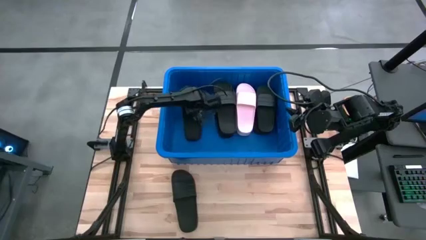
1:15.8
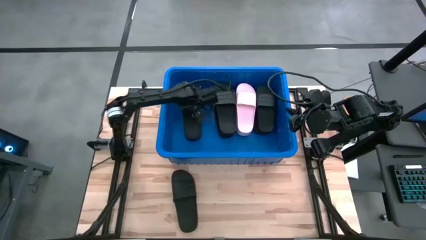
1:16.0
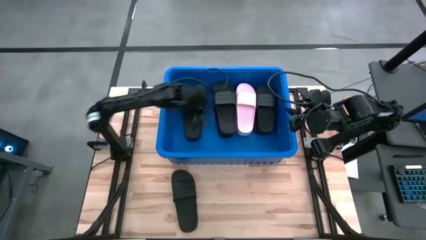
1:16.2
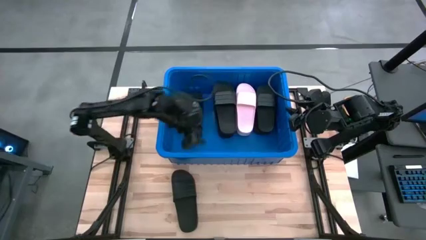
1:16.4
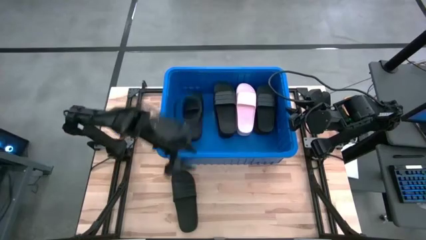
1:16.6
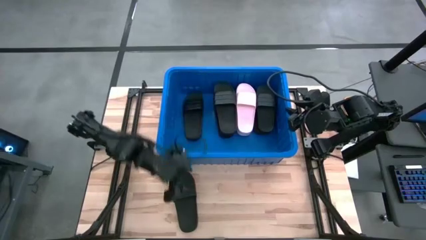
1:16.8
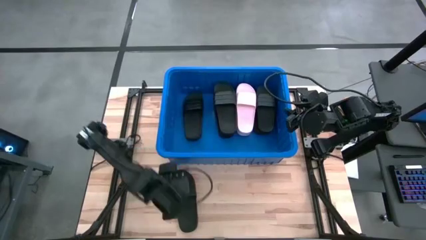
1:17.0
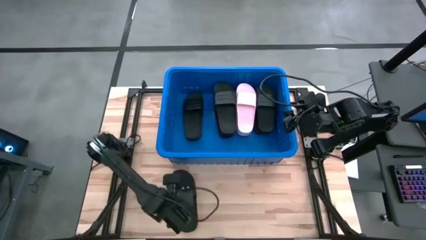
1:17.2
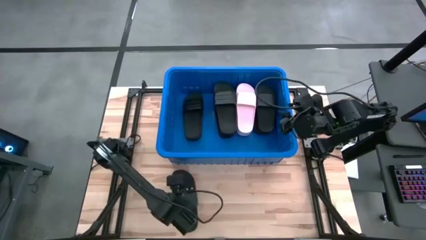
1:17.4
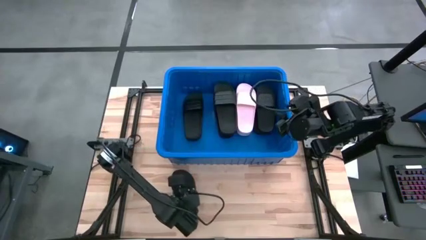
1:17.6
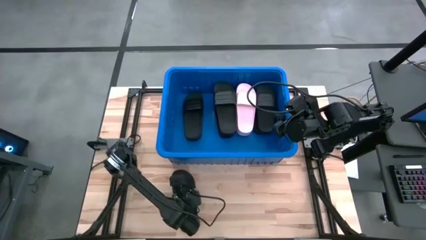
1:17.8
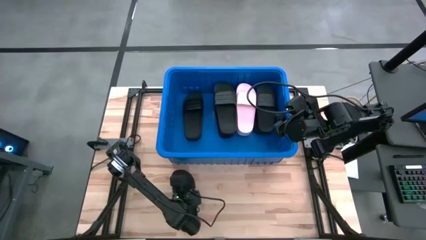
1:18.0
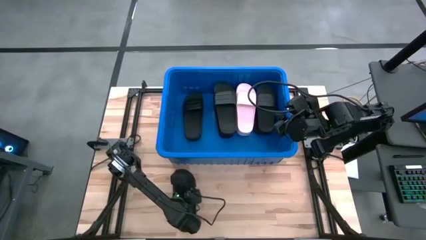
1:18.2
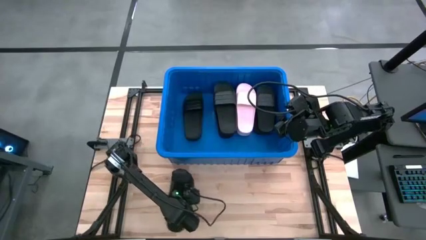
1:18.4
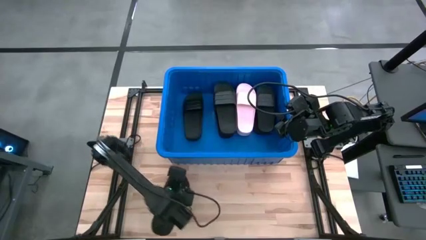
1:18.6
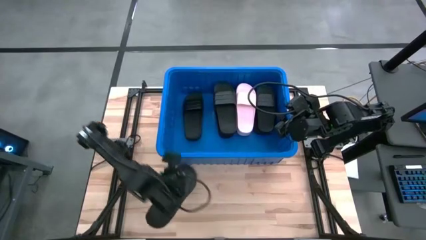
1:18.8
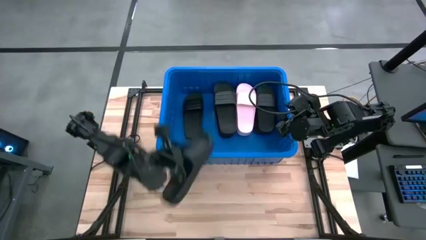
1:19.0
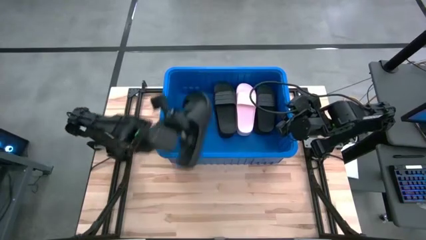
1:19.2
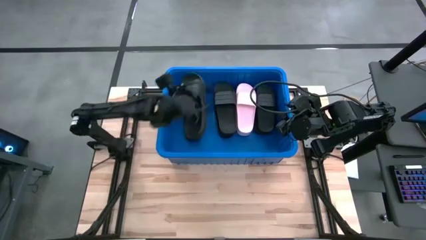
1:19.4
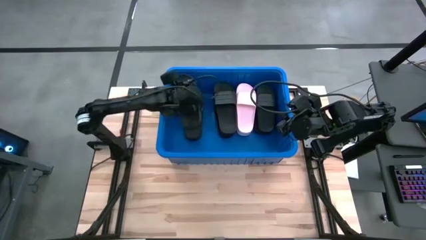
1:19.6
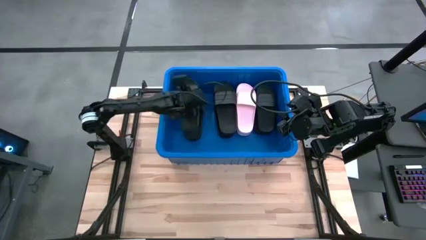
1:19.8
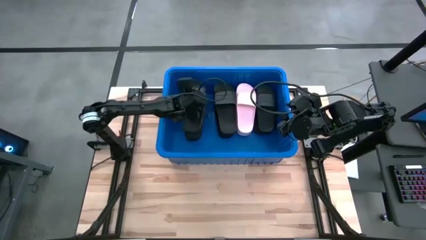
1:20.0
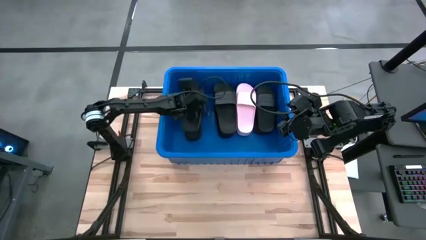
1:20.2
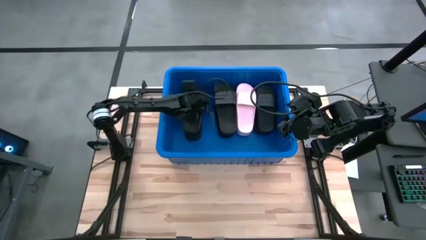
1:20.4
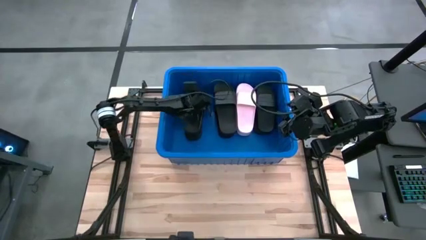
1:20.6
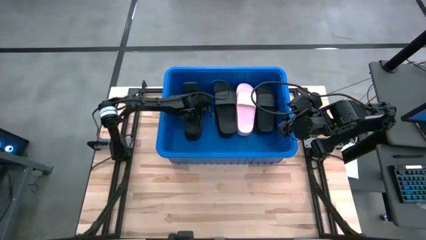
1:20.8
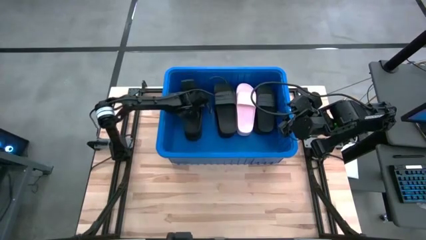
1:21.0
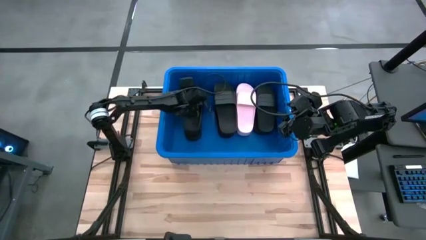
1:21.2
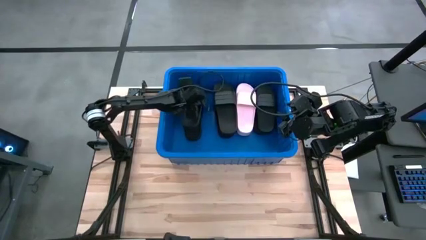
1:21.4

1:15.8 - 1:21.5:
Task: Pick and place slides into bin
Put the black slide into the blue bin

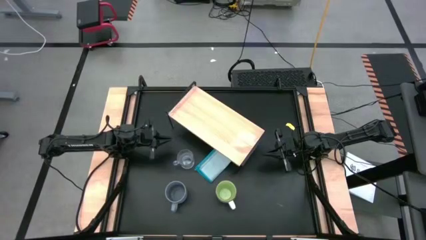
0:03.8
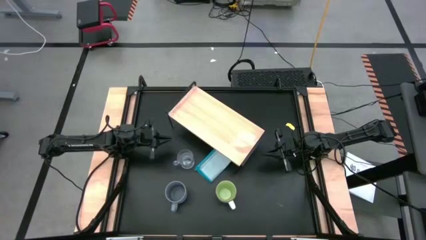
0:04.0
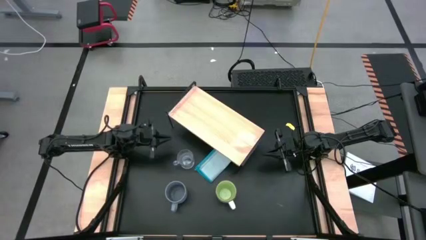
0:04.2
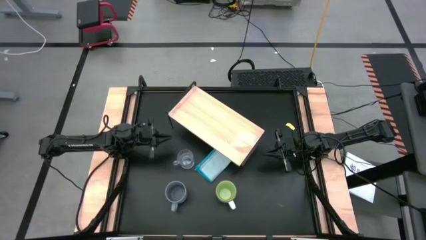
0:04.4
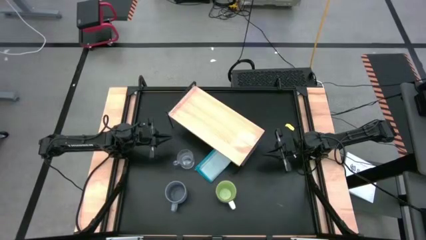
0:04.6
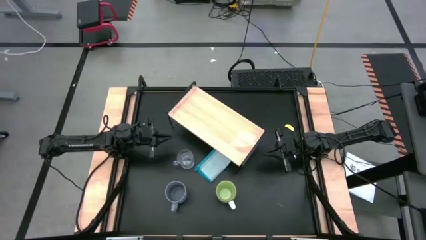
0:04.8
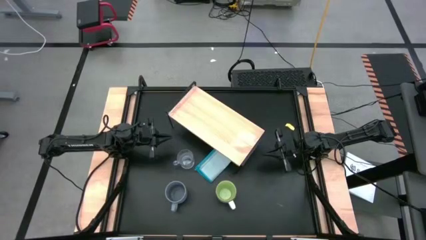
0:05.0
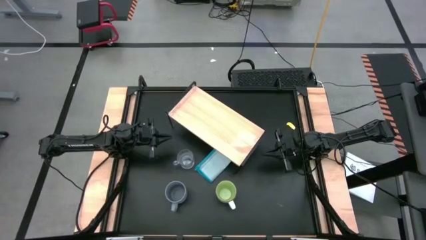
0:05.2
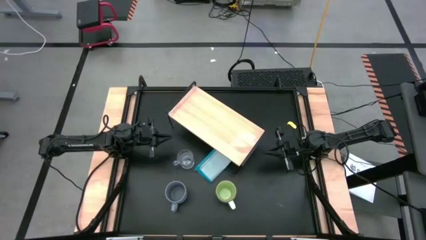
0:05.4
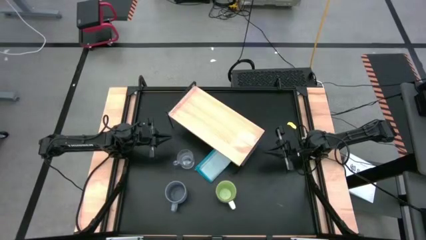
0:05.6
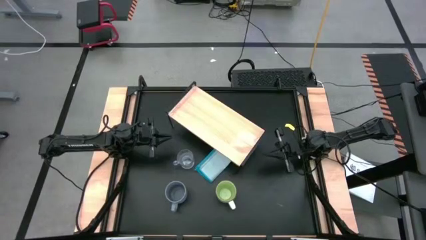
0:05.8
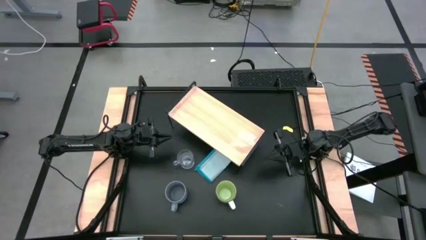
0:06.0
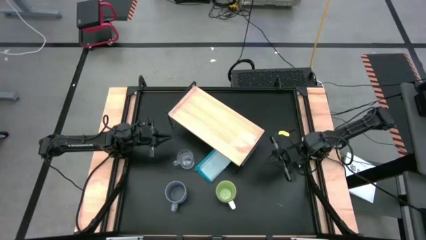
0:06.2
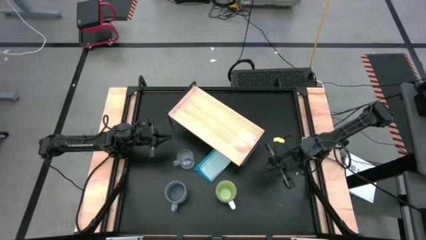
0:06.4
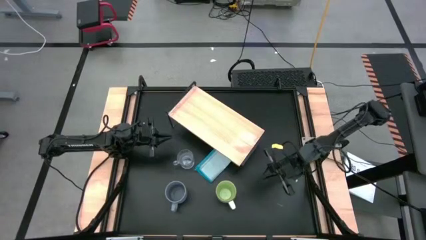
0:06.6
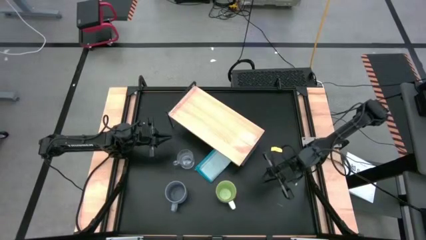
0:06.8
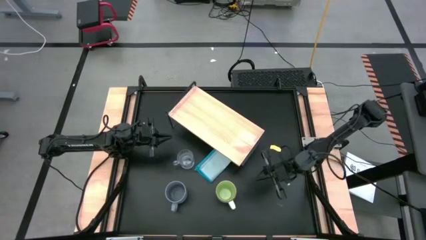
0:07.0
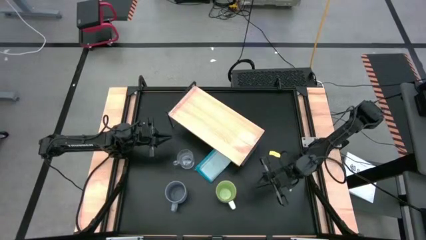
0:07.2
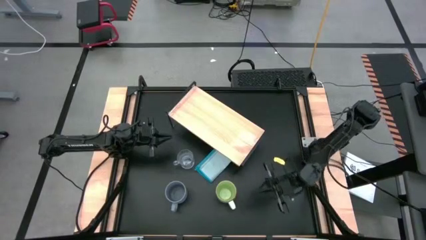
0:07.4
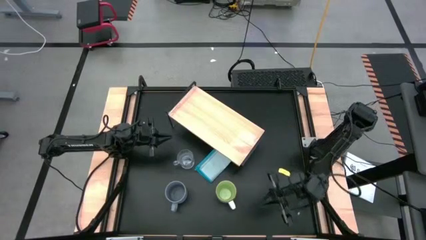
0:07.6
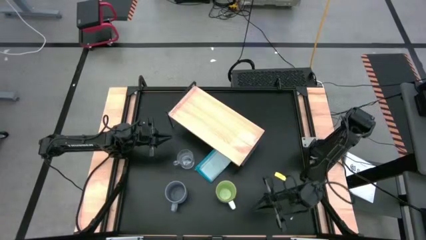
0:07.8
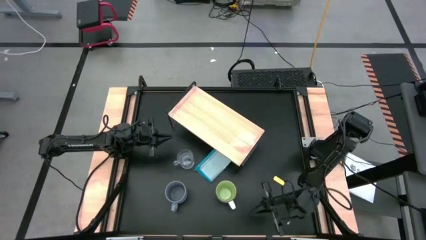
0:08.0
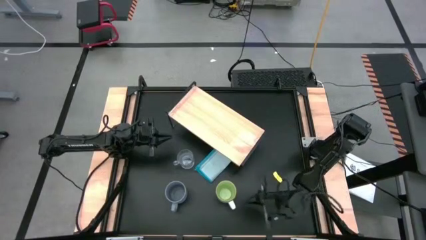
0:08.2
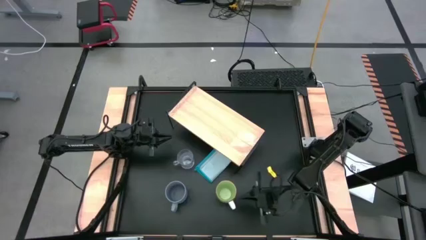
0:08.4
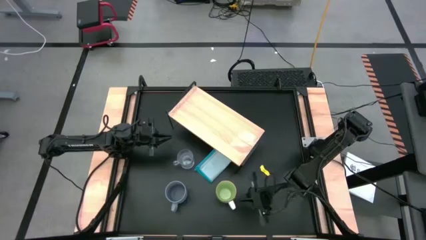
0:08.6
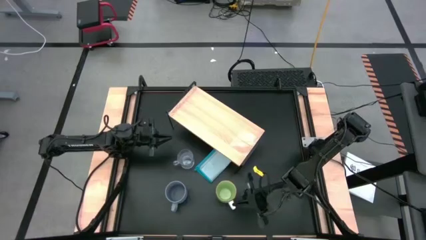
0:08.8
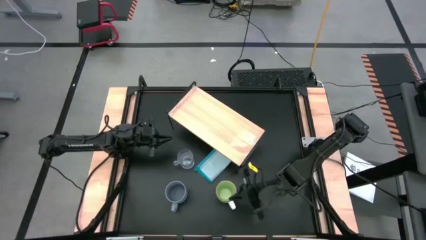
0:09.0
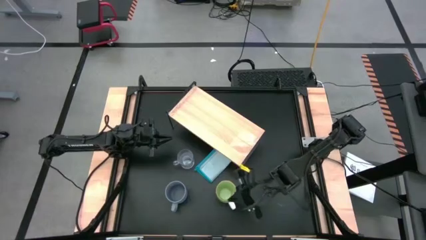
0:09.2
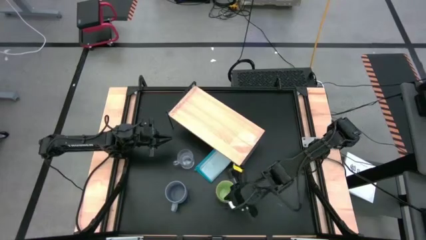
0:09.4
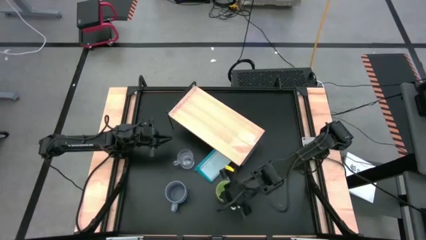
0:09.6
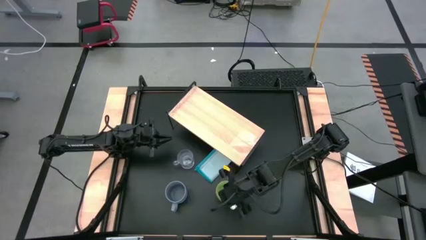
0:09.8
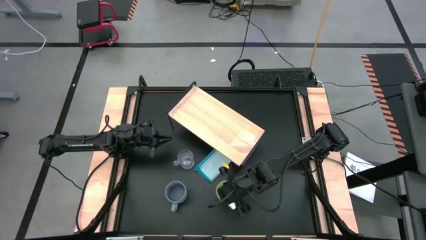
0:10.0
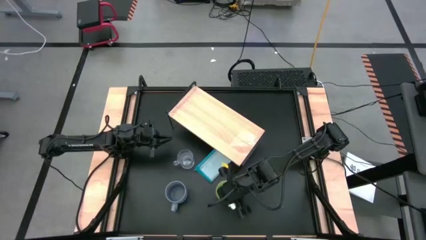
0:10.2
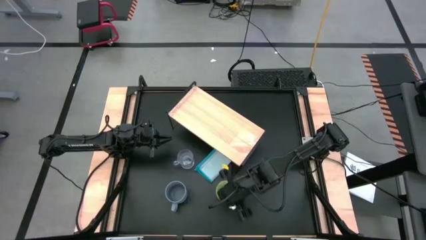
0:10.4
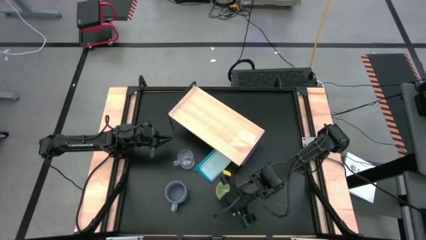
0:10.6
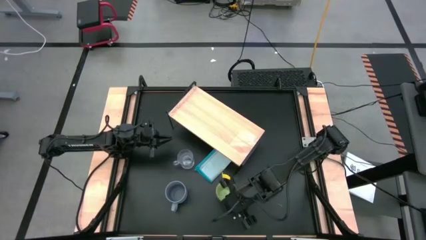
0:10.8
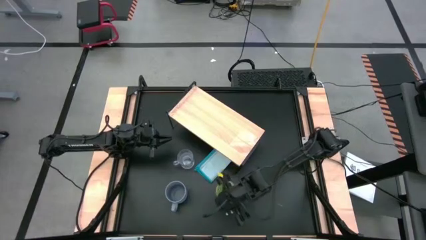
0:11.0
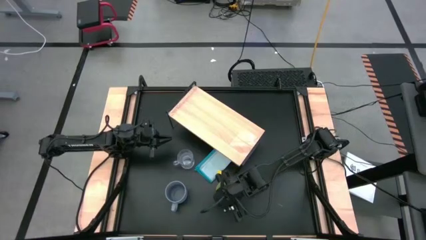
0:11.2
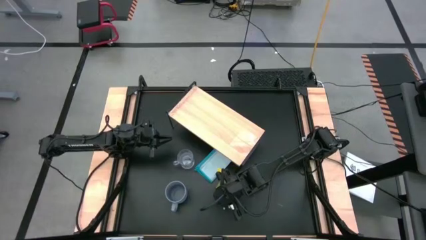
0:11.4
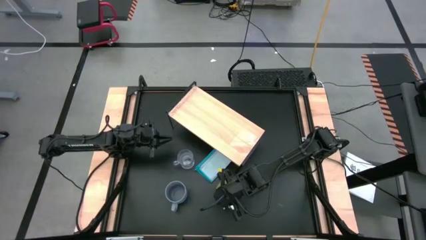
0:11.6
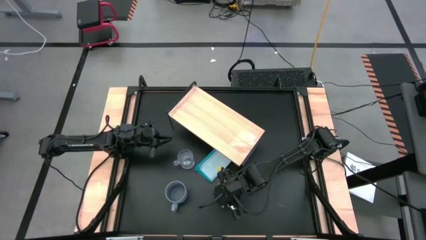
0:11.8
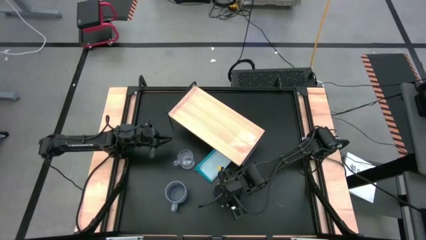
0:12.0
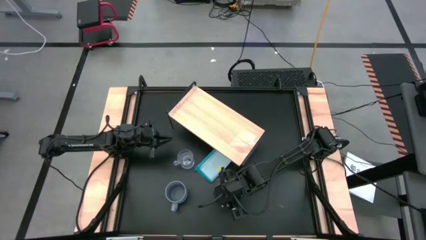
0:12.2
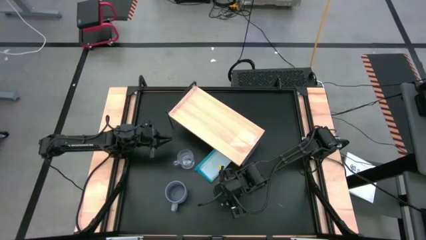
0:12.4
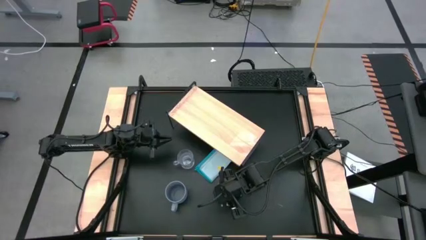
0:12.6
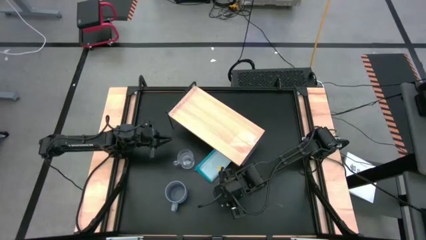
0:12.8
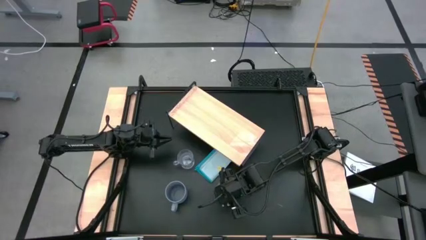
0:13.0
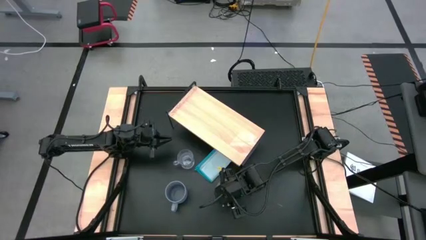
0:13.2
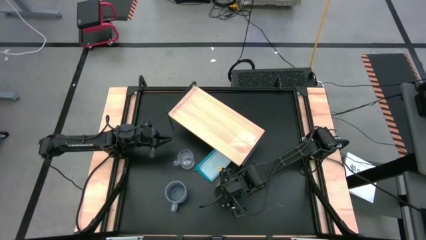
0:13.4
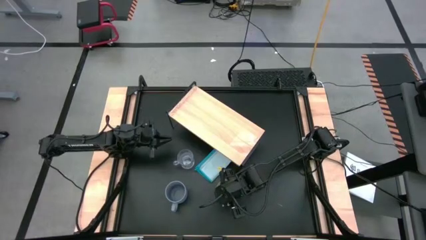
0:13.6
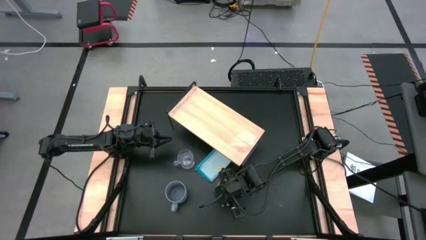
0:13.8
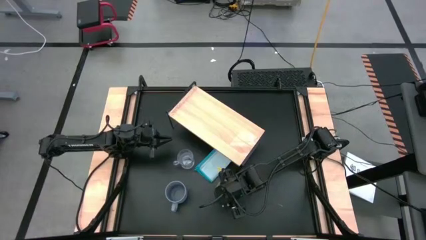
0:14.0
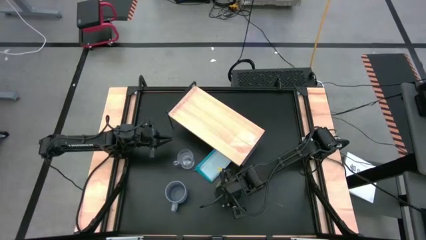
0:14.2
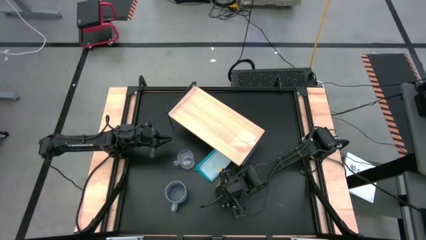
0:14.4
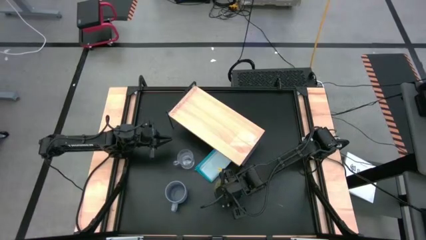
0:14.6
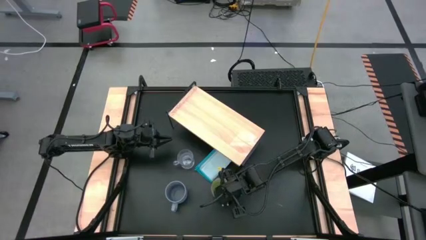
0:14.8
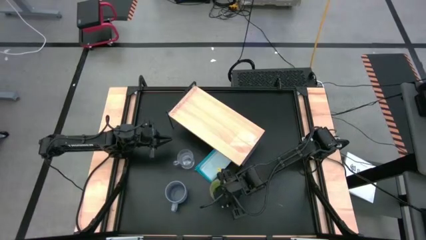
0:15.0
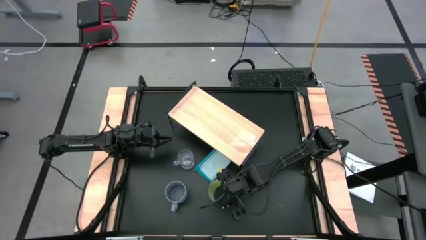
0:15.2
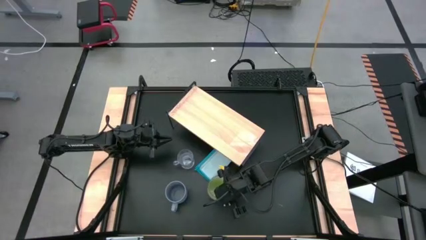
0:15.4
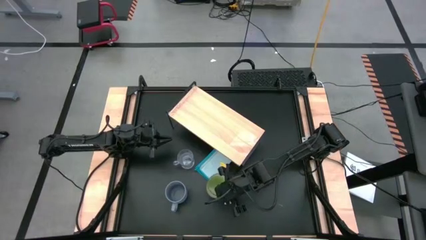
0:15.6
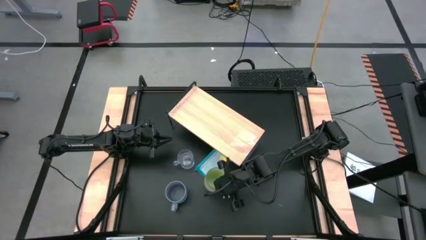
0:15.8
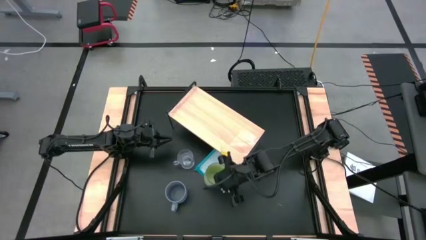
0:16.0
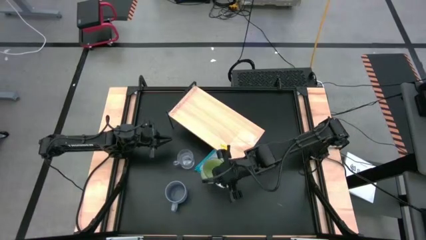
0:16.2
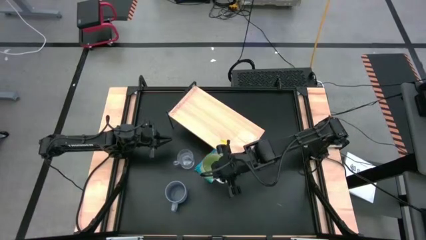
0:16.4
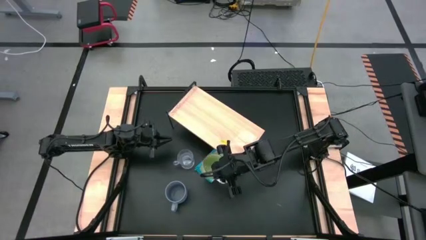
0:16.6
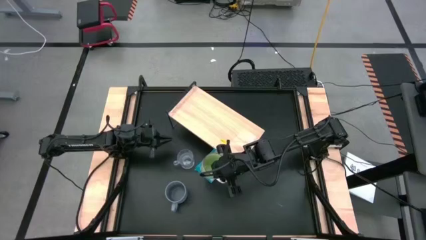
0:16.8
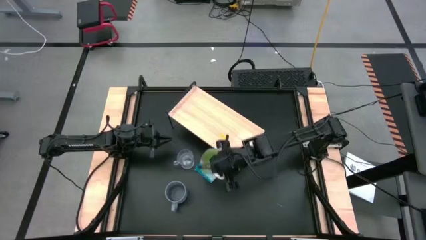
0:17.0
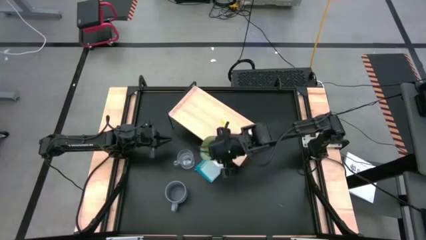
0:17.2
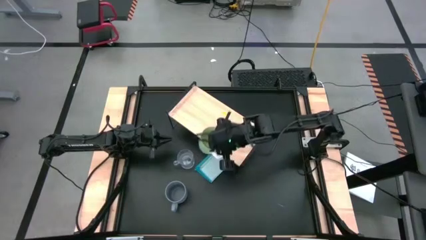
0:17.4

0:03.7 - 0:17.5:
Task: Stack small to large cups/mugs on shelf
Put the green mug on the shelf
